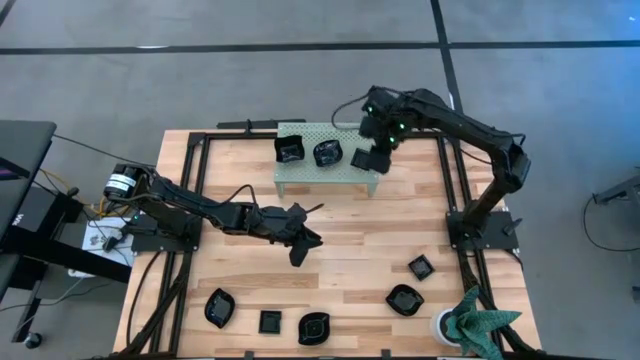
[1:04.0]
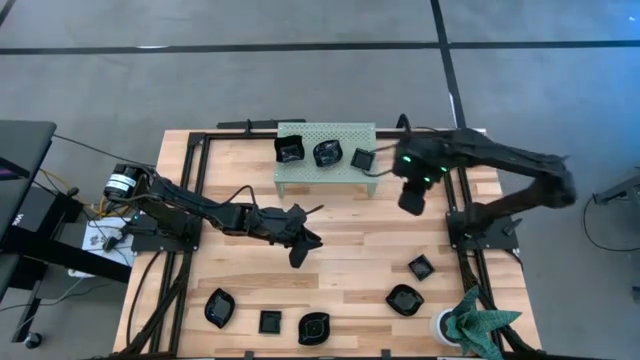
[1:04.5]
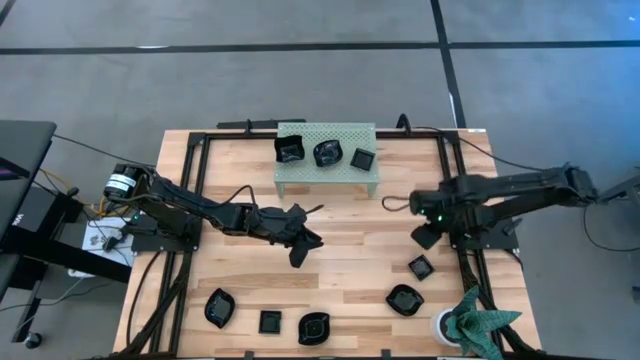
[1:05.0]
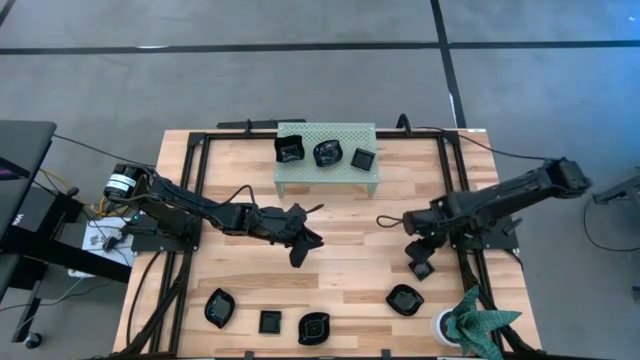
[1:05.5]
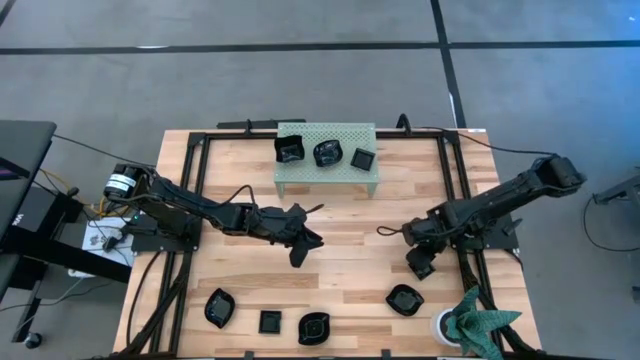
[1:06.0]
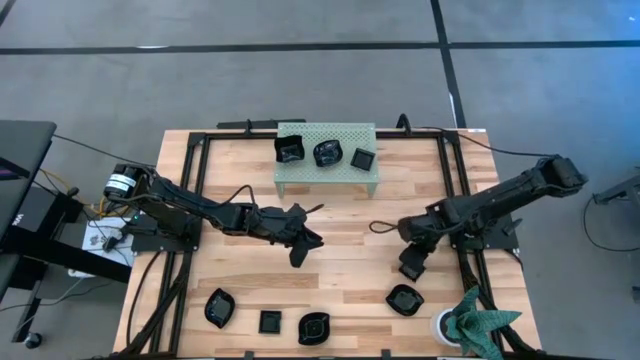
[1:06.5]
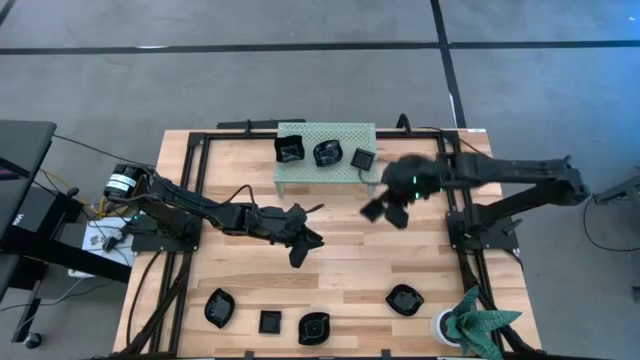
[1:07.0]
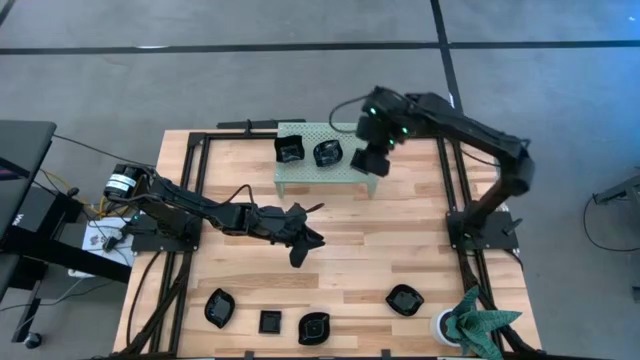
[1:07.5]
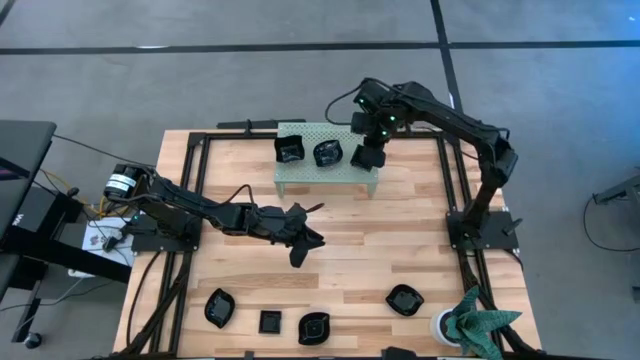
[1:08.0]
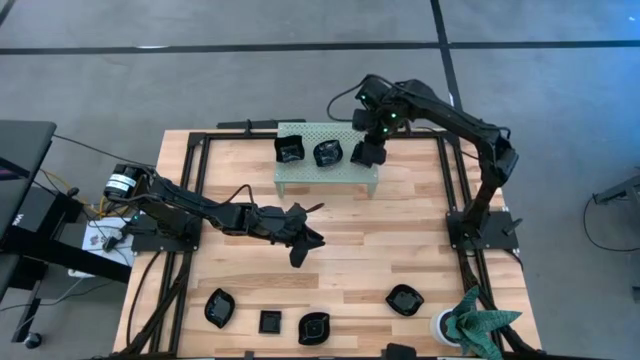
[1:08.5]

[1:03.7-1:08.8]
Task: Pick & Place Mini shaped plates
Stack the square plate on the square plate on the shelf

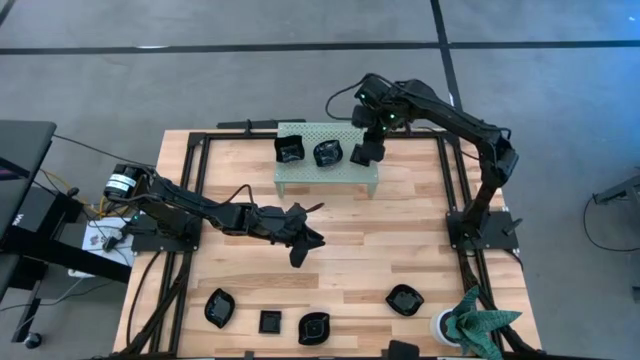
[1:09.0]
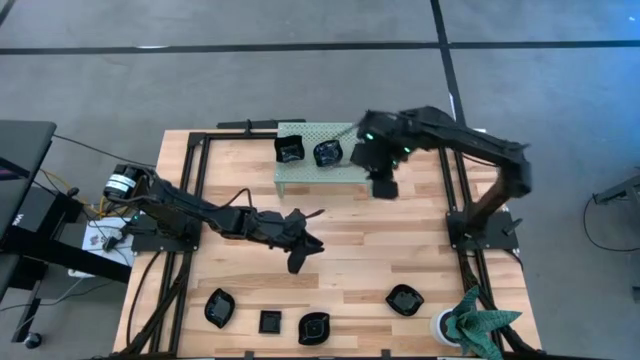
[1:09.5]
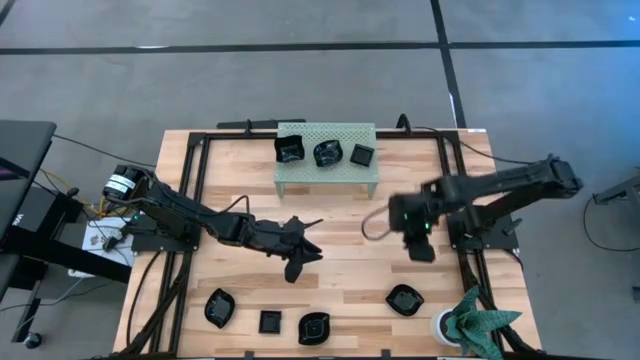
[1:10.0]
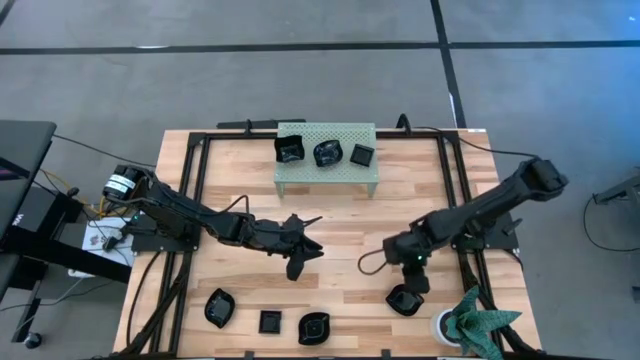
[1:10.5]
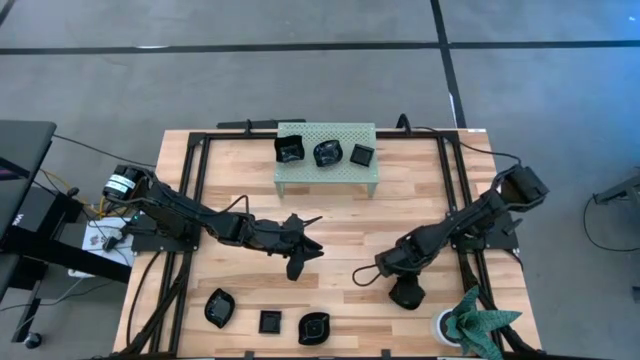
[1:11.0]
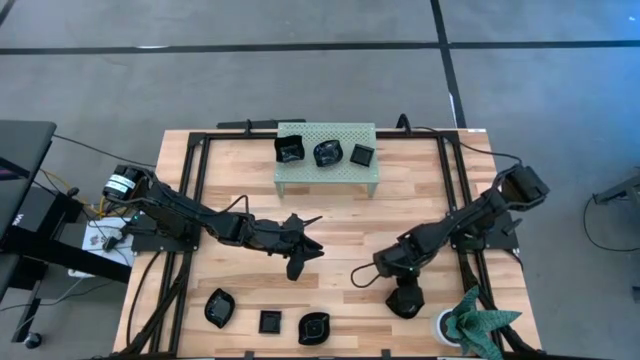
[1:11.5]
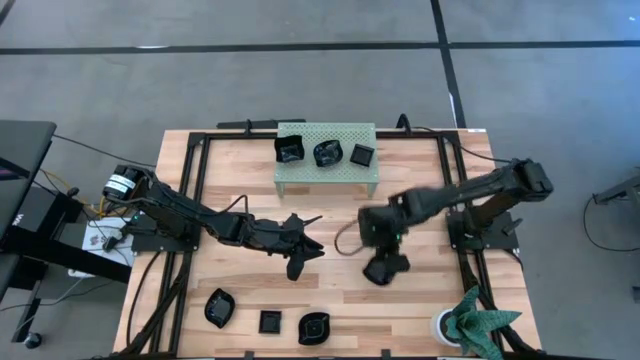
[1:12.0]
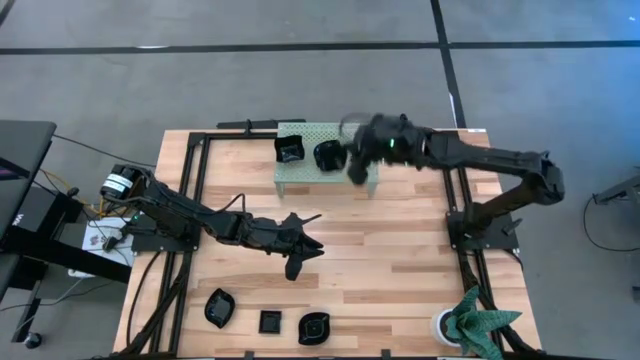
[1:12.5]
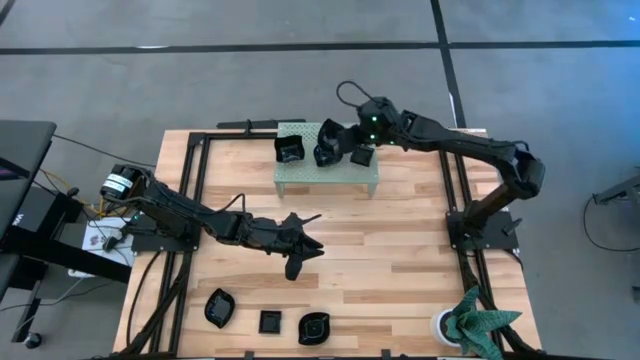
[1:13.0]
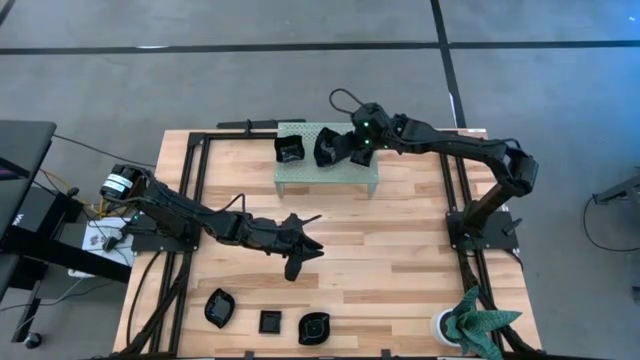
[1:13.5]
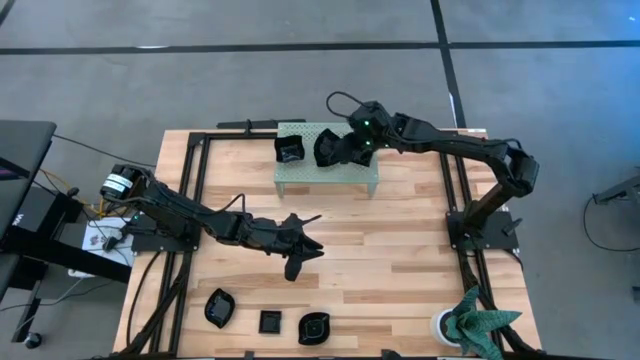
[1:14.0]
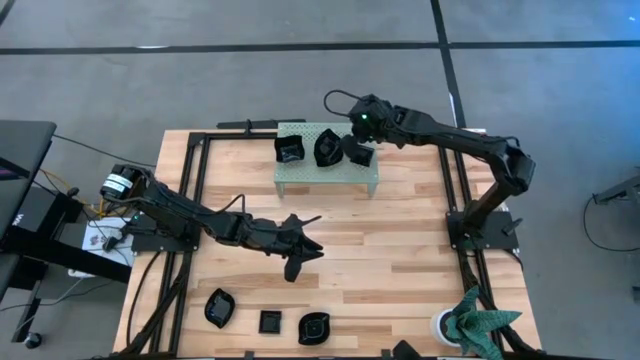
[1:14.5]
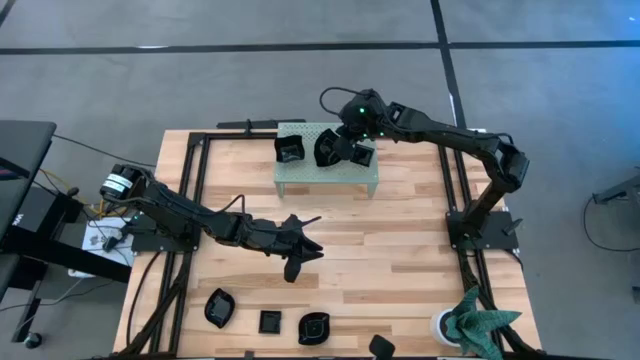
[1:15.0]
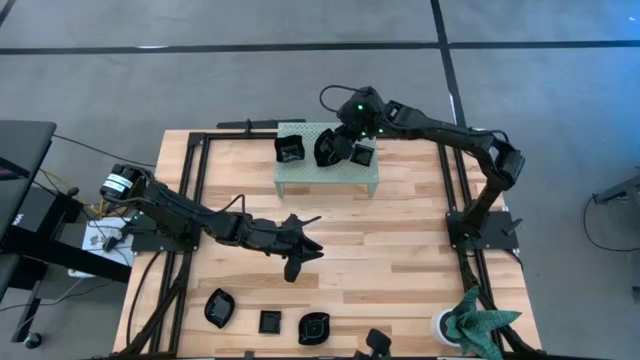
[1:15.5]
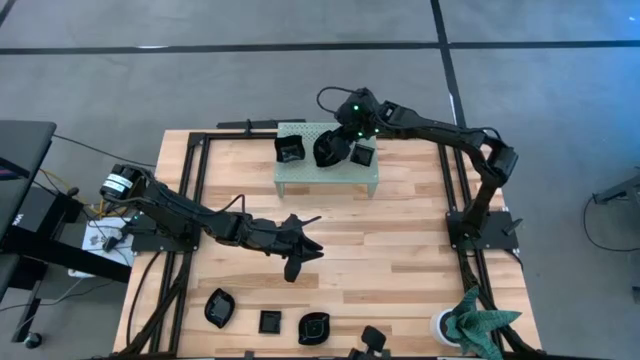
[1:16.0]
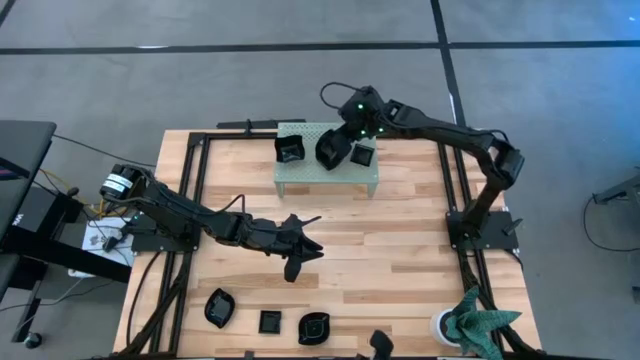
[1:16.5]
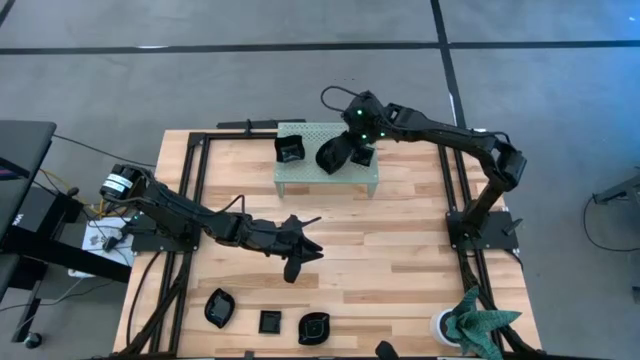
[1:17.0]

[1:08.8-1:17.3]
Stack the leaf-shaped plate on the leaf-shaped plate on the shelf

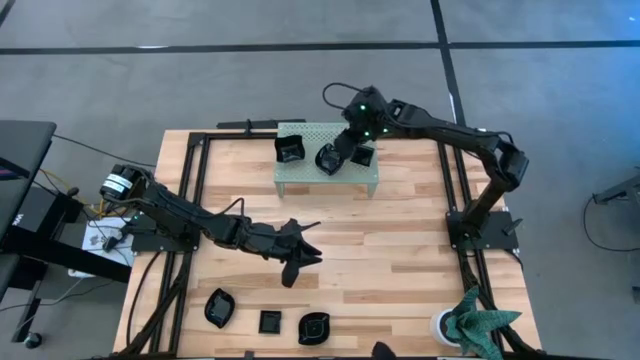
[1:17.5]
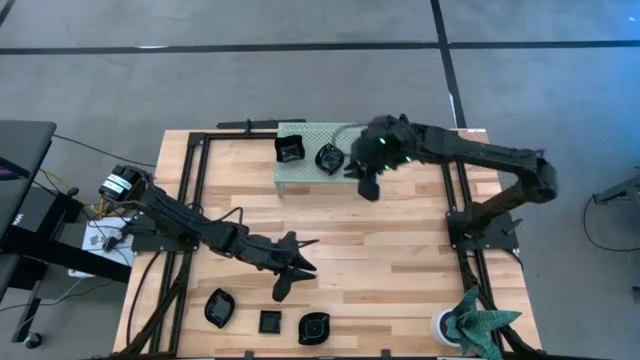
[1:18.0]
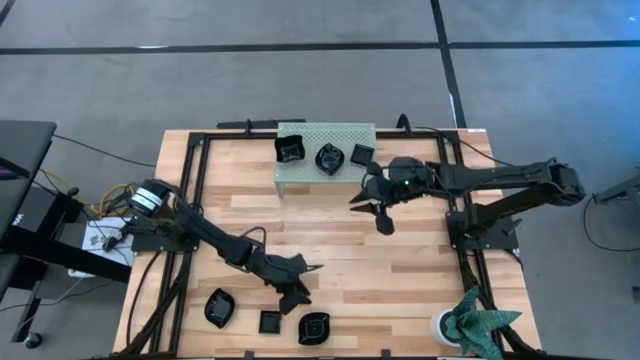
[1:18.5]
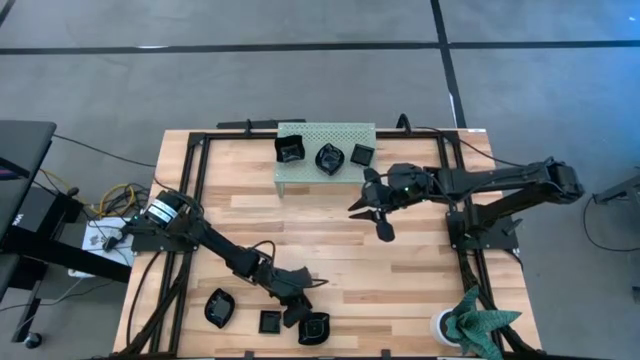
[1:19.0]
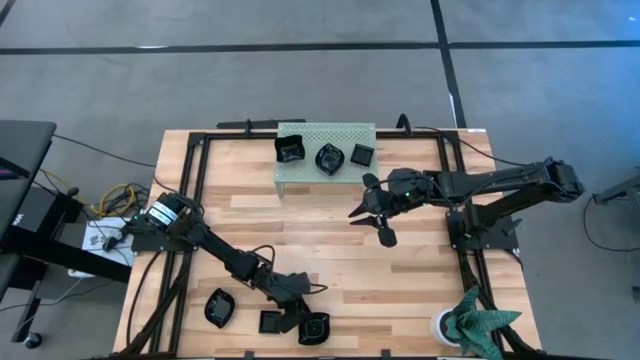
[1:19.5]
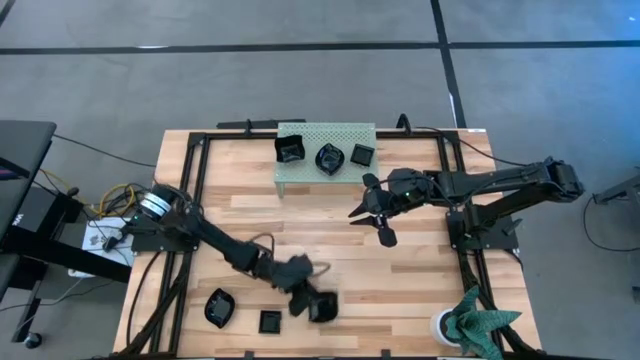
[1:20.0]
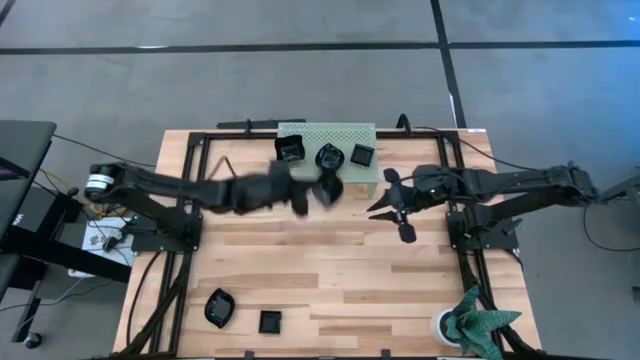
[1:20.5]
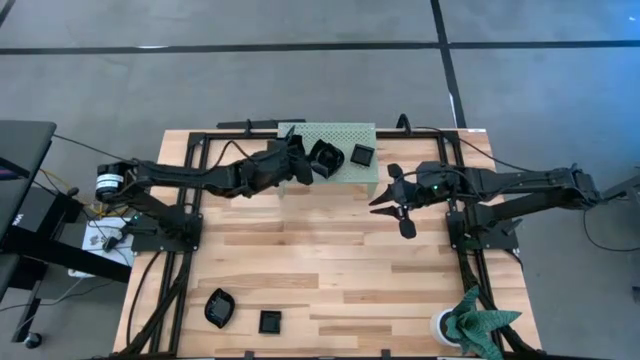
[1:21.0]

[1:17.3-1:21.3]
Stack the leaf-shaped plate on the leaf-shaped plate on the shelf

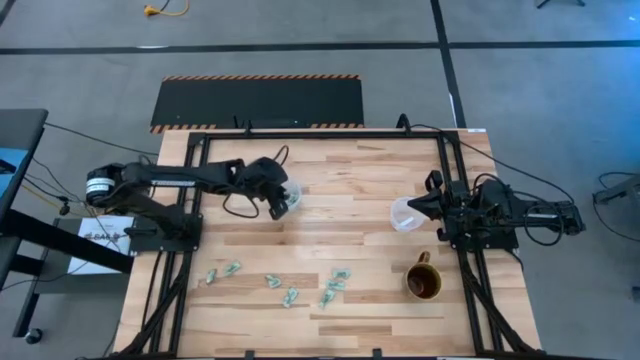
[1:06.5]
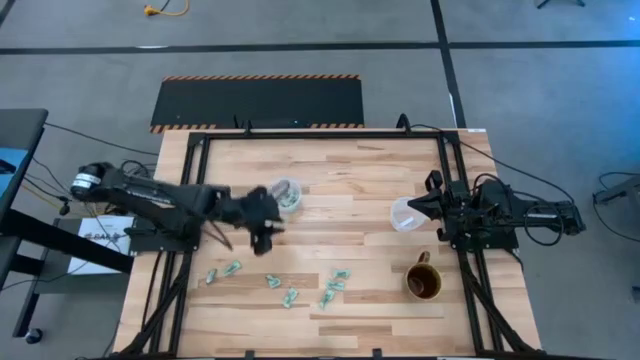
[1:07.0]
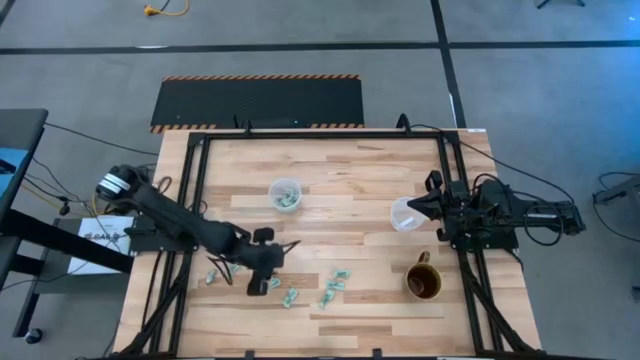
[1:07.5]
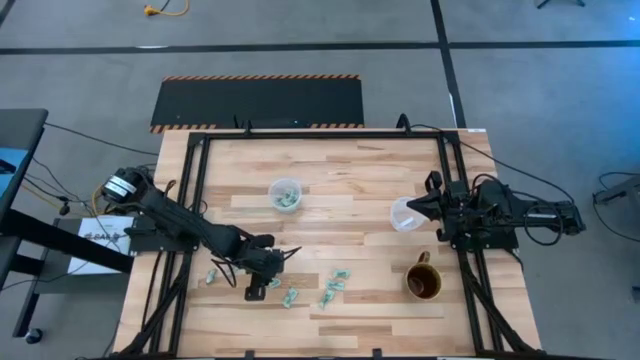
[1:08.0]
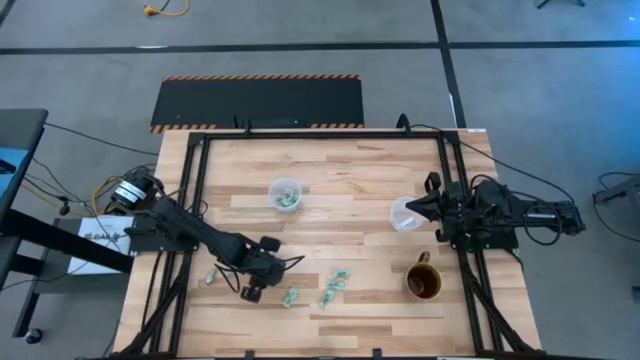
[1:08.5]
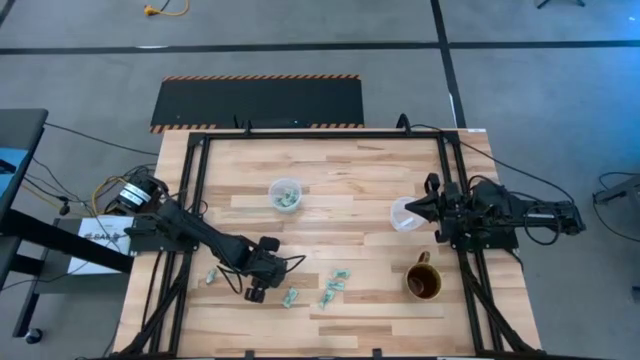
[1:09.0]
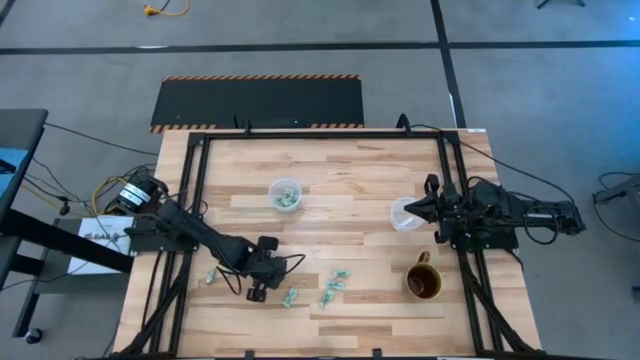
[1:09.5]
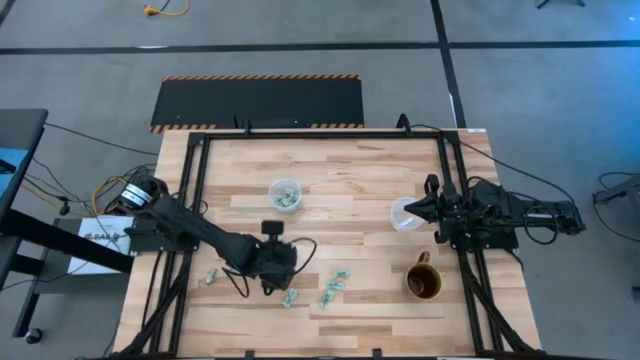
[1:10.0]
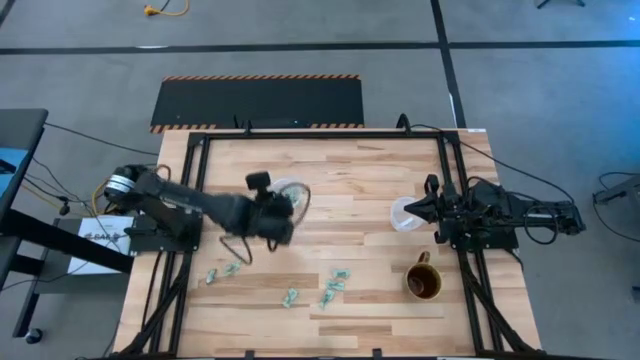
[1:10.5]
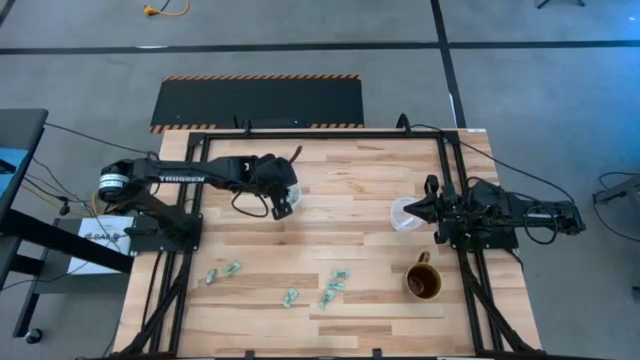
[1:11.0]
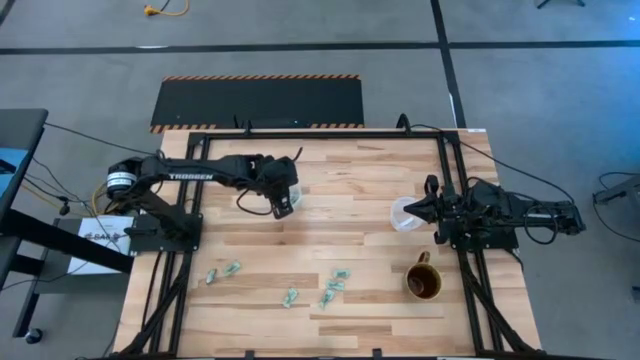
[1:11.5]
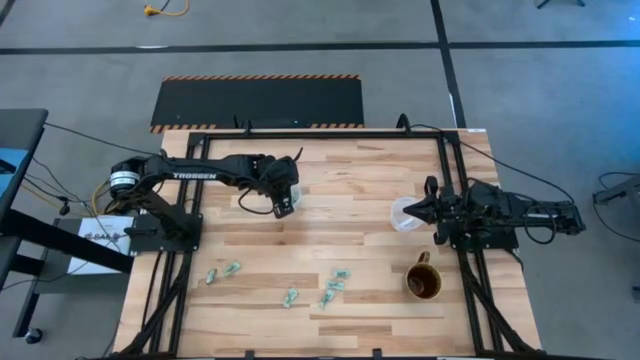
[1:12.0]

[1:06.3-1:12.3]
Task: Pick and place Stevia / Truvia into bins
Put the white stevia packet into the left transparent container
